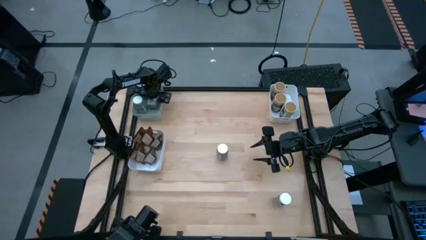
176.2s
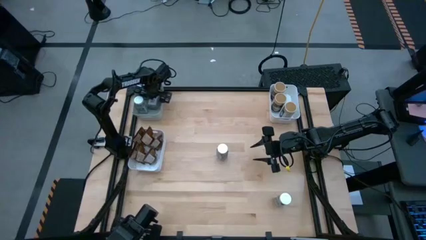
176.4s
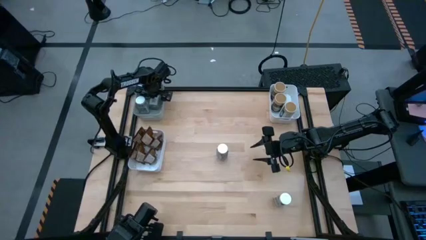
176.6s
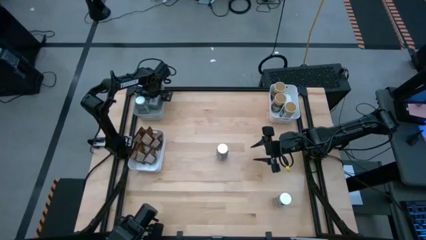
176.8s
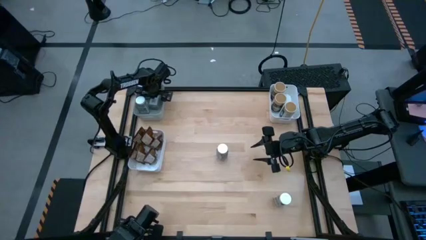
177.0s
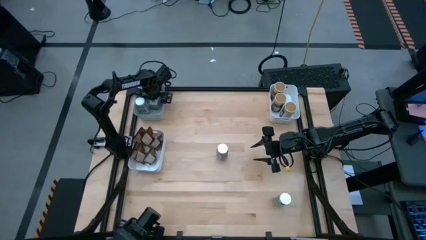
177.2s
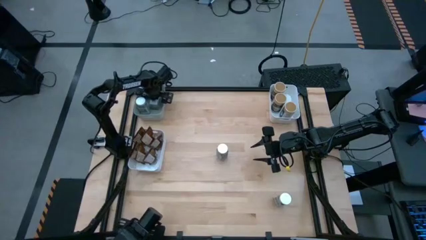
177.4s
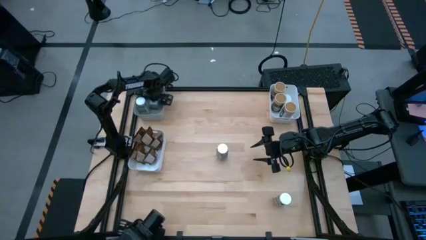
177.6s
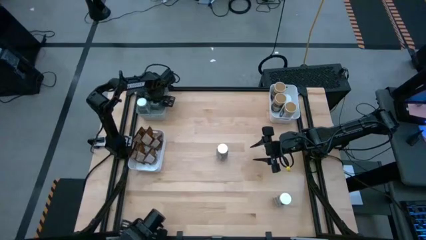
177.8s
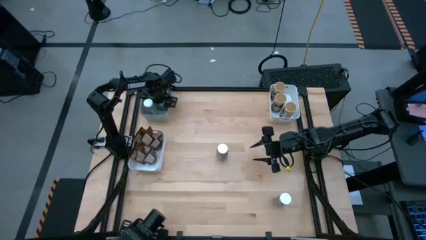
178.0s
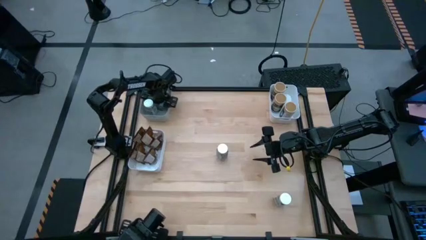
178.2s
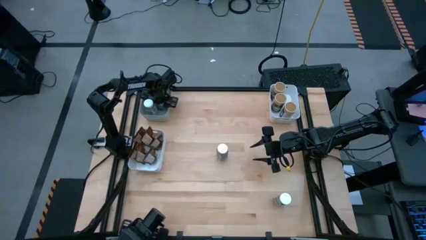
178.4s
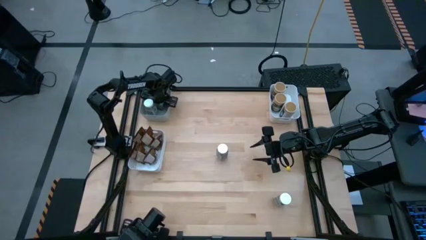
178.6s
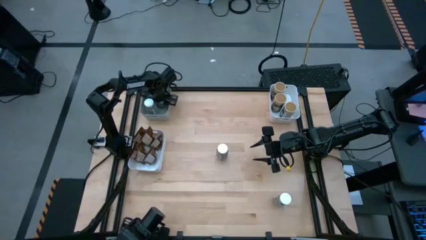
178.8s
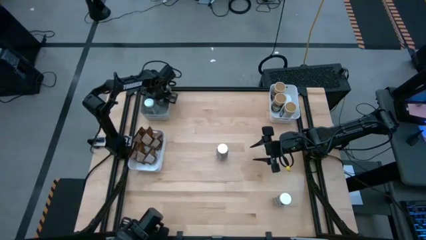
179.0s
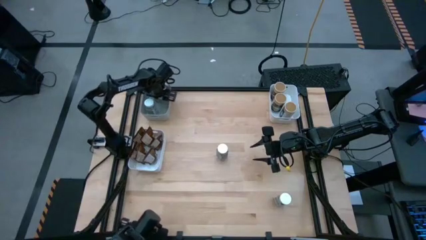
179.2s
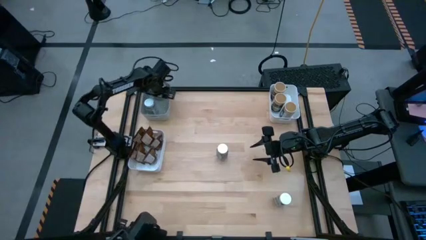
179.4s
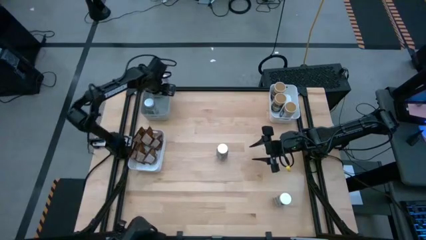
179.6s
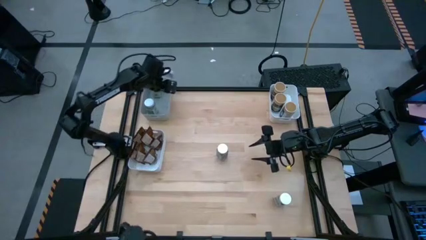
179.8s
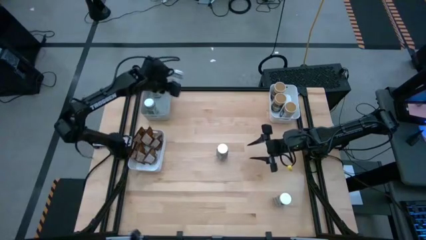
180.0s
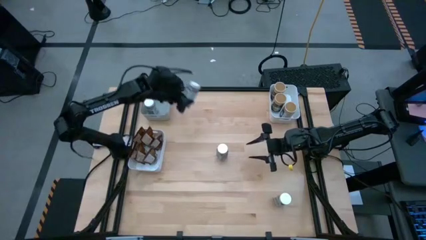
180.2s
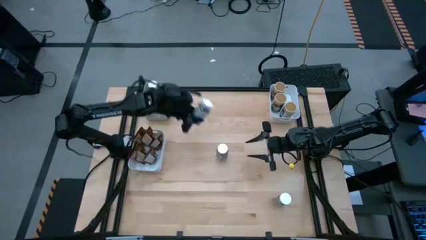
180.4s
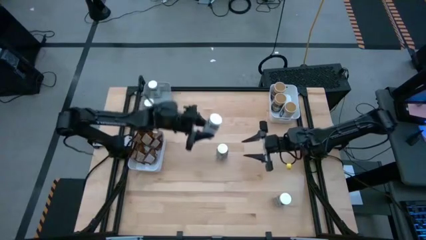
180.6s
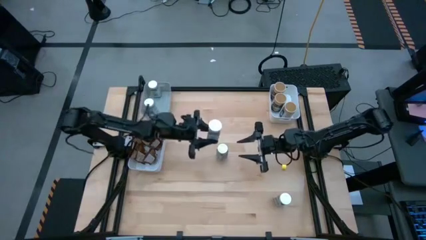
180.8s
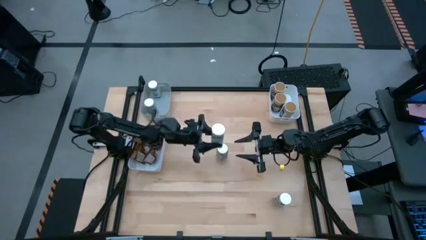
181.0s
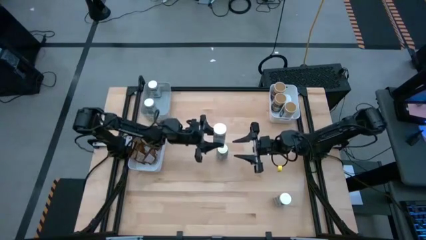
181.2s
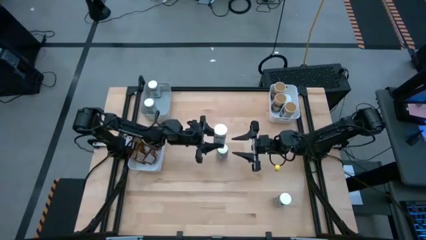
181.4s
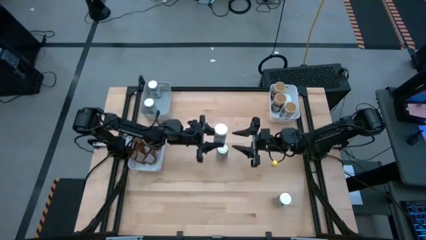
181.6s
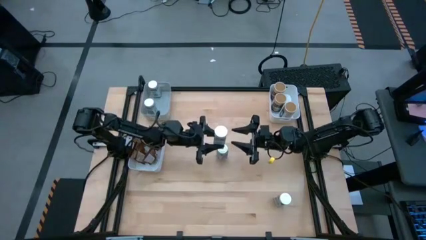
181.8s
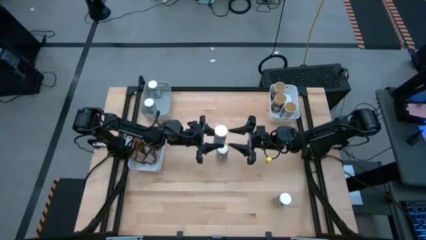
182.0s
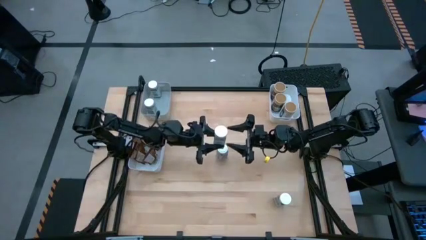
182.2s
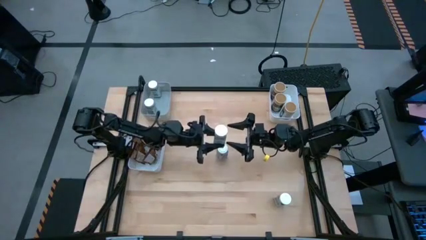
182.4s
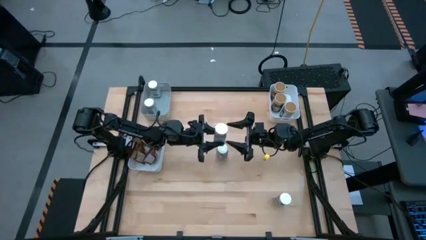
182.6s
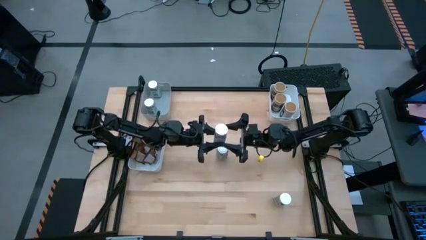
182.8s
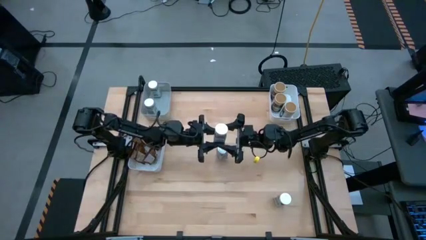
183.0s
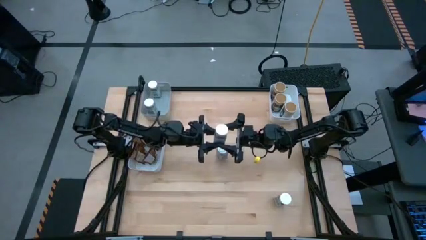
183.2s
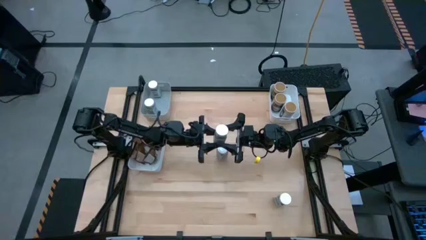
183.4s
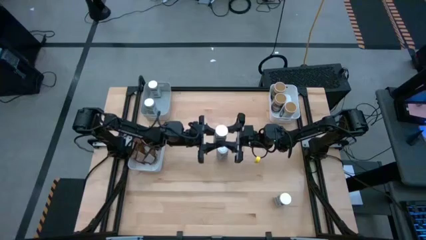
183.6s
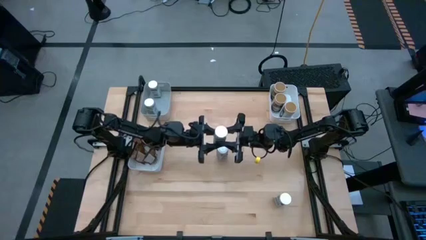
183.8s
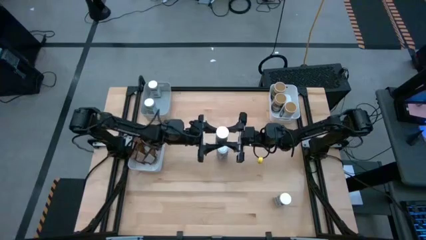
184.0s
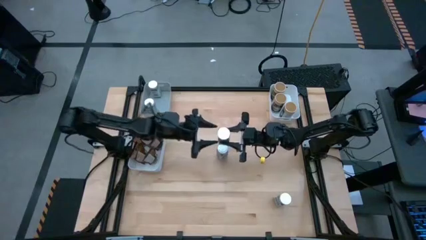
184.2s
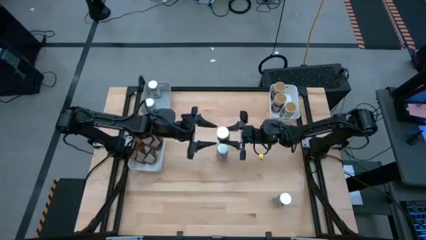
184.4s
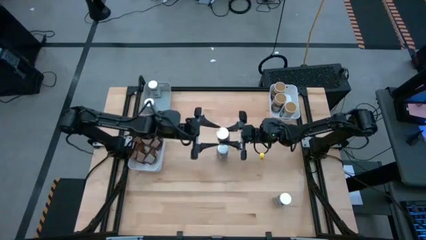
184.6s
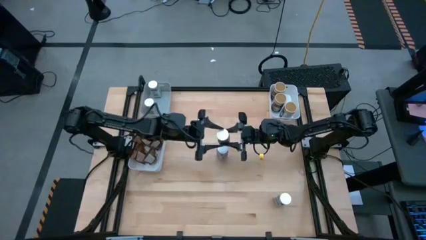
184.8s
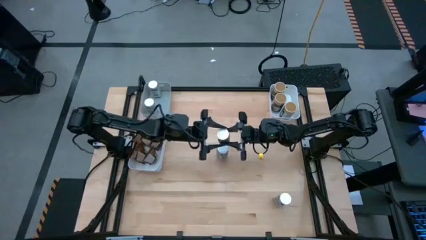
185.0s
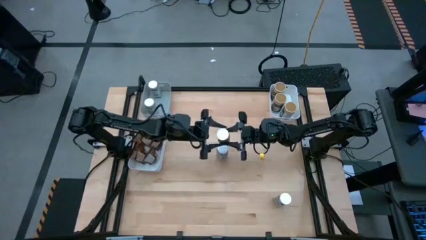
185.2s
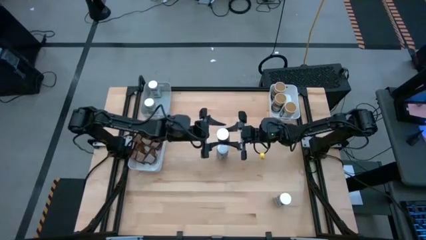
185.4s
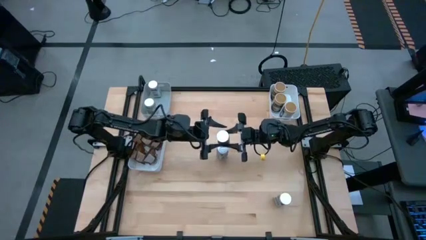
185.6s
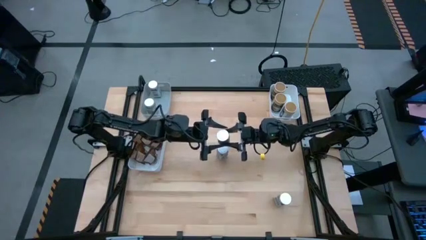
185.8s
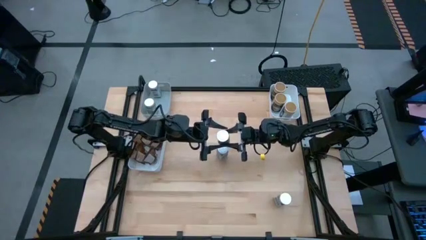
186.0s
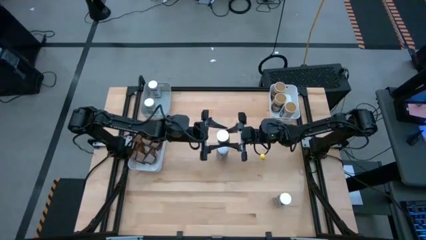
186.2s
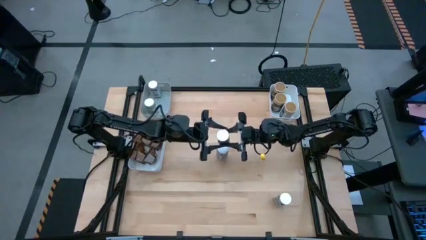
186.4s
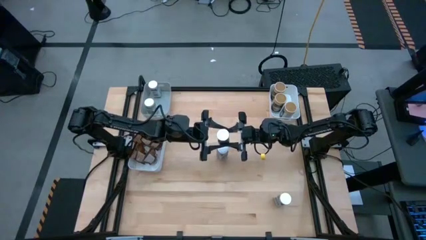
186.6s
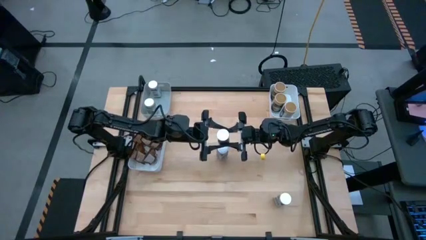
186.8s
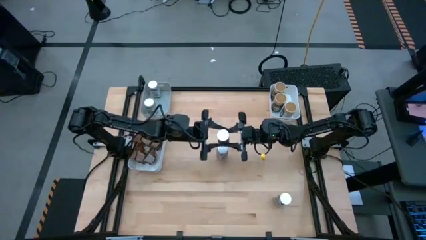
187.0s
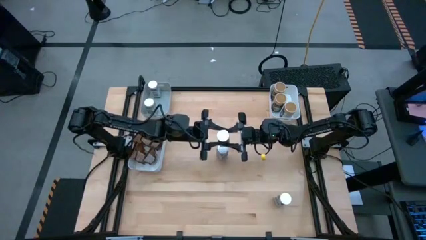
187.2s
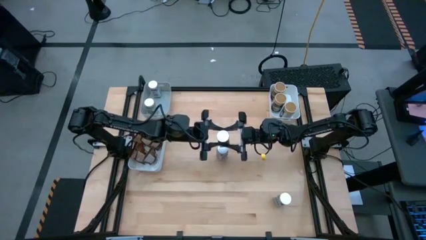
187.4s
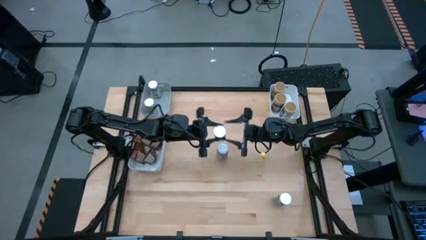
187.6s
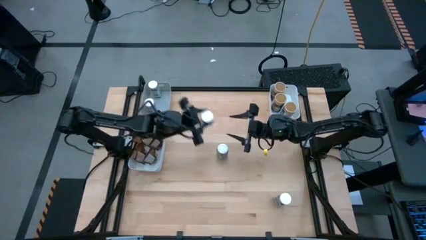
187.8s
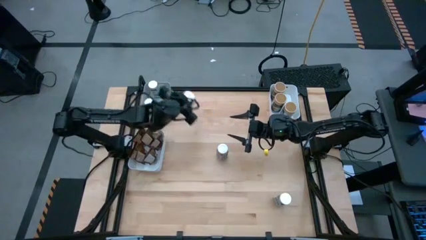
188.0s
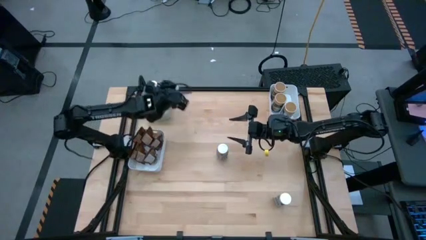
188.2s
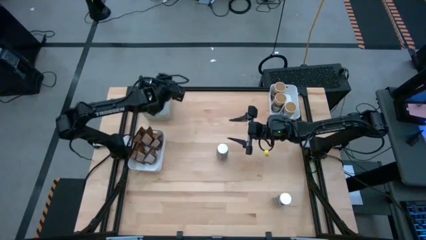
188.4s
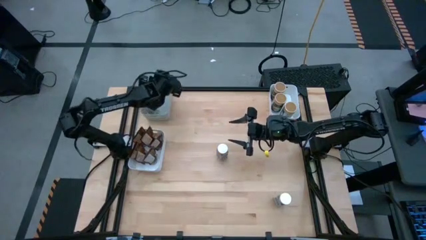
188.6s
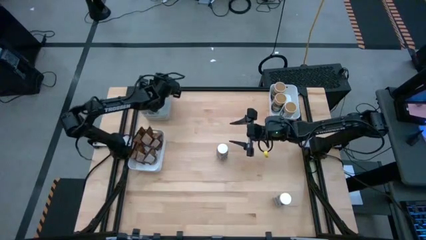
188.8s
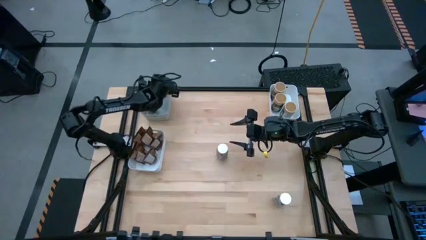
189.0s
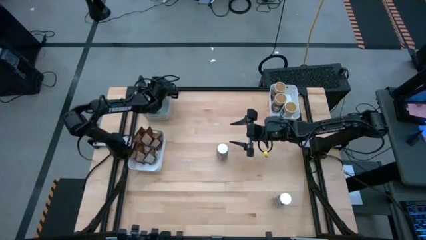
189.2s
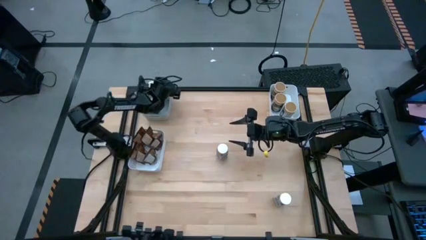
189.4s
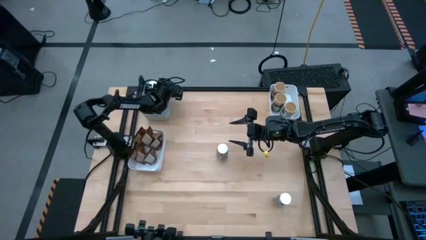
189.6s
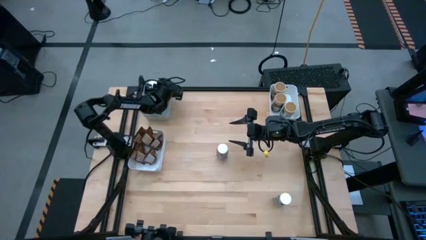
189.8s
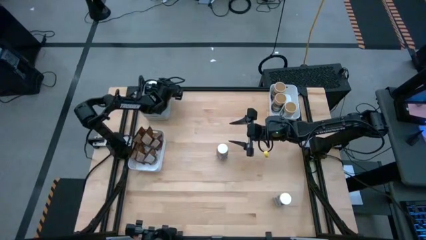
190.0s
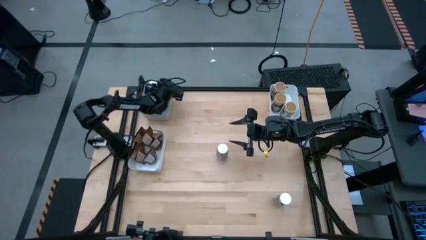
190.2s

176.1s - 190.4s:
Task: Sort spices by type
Put the white seasoning bottle into the gray bin
